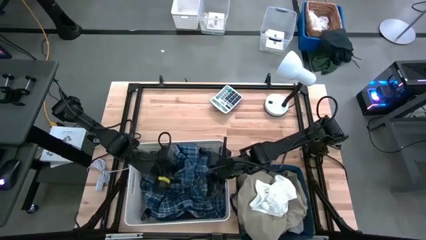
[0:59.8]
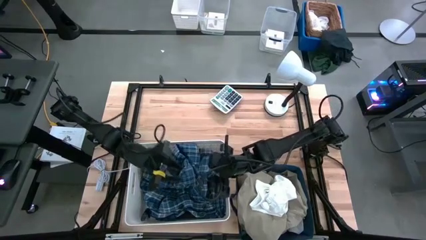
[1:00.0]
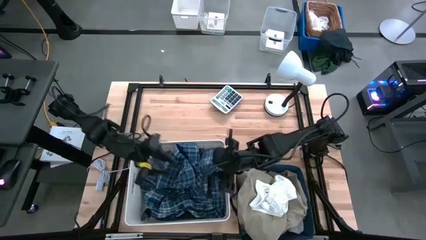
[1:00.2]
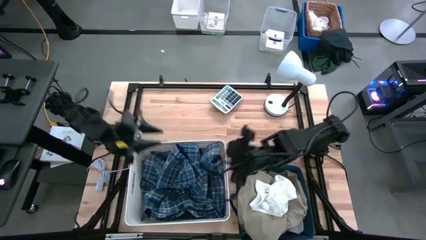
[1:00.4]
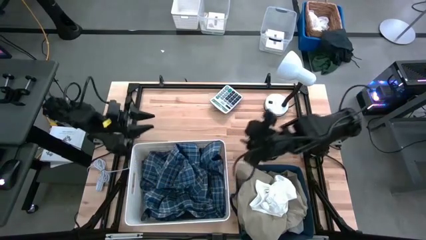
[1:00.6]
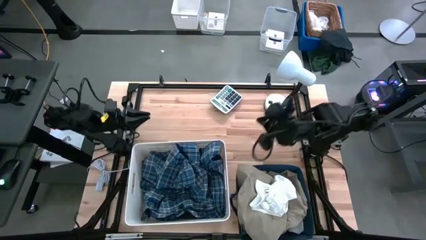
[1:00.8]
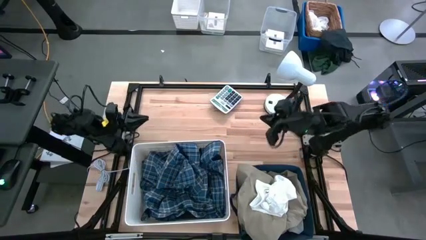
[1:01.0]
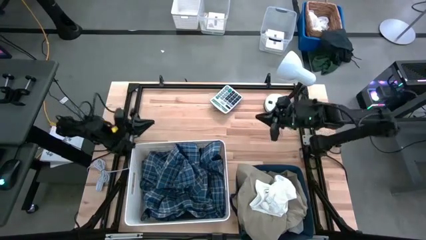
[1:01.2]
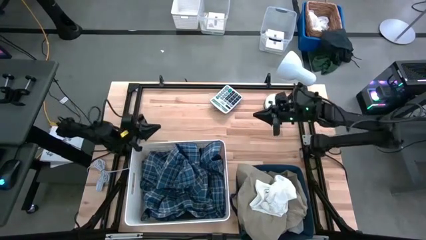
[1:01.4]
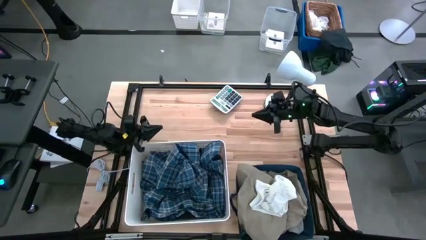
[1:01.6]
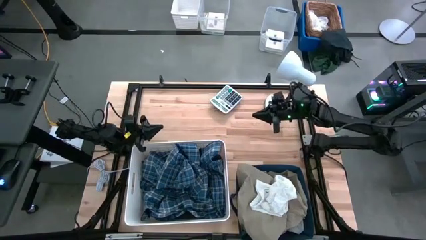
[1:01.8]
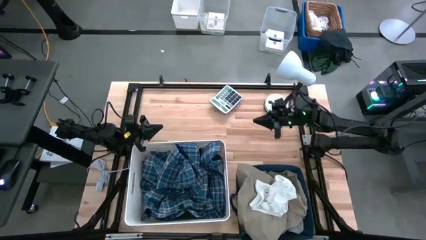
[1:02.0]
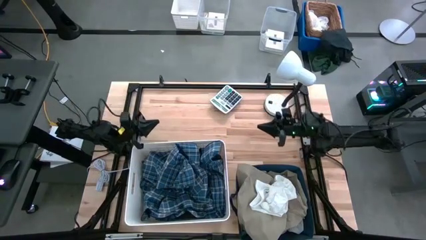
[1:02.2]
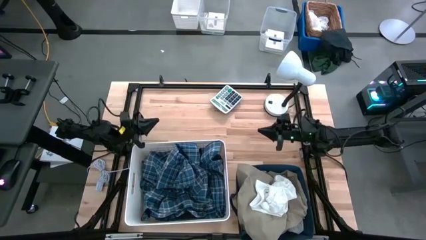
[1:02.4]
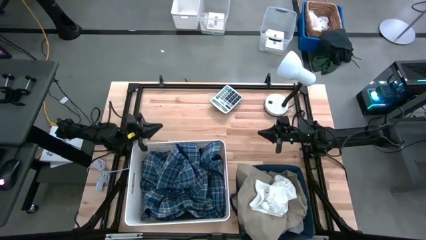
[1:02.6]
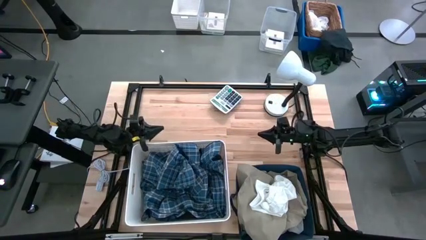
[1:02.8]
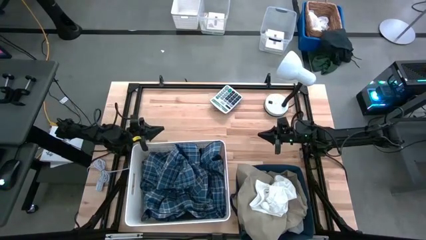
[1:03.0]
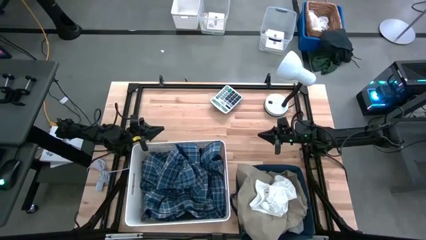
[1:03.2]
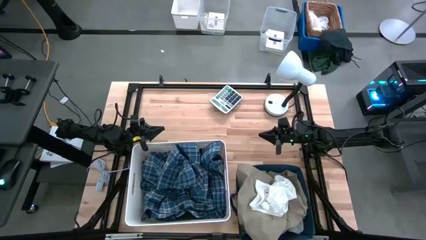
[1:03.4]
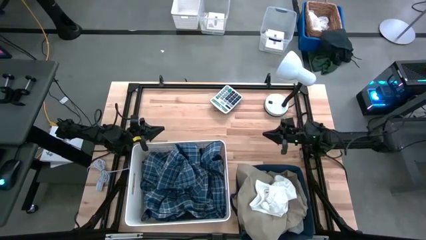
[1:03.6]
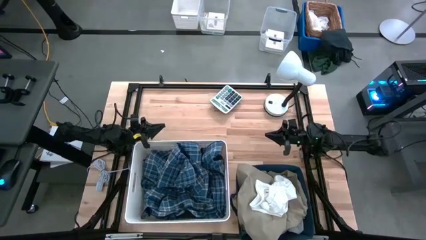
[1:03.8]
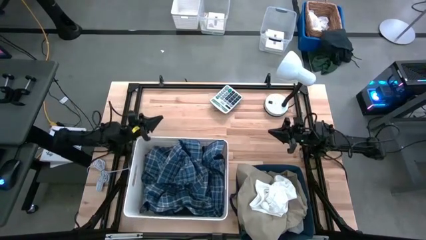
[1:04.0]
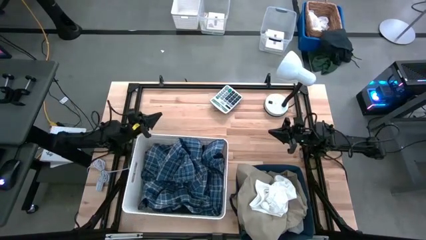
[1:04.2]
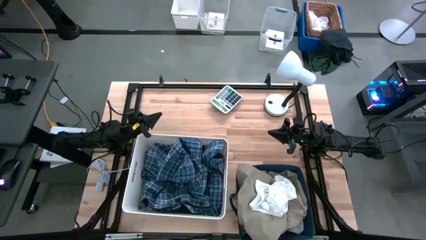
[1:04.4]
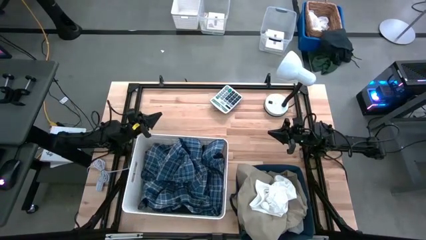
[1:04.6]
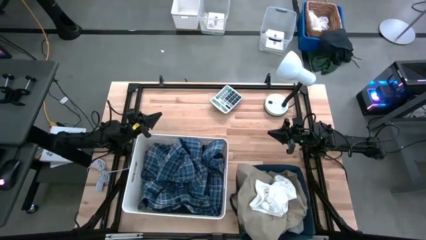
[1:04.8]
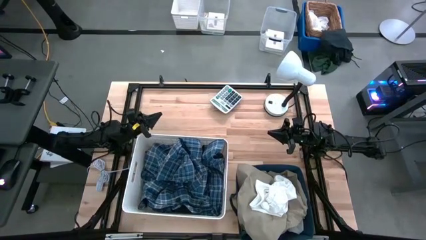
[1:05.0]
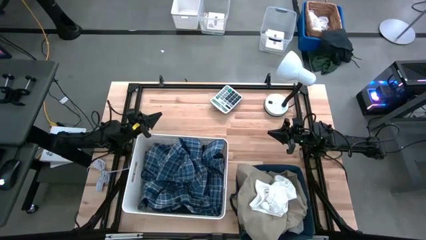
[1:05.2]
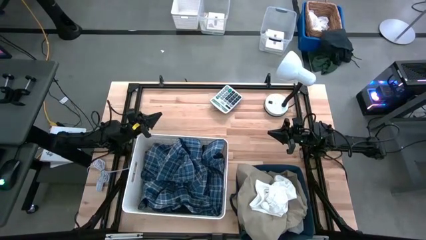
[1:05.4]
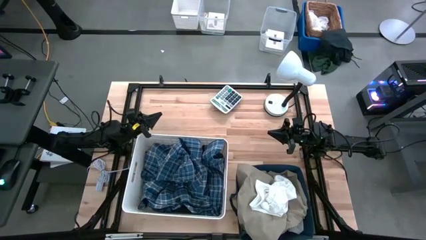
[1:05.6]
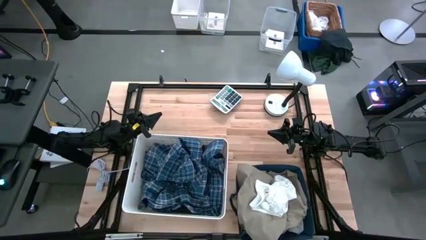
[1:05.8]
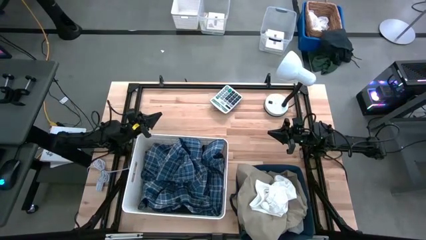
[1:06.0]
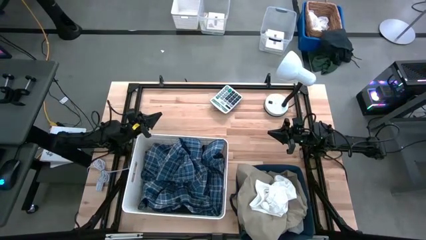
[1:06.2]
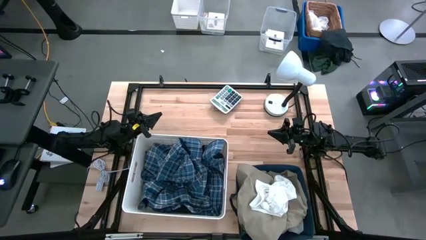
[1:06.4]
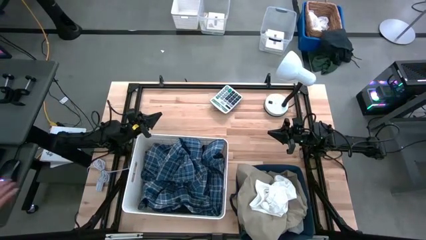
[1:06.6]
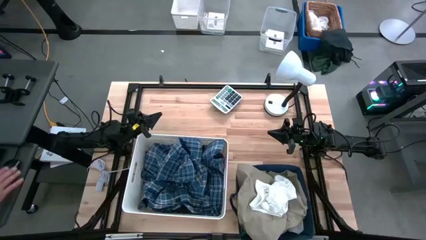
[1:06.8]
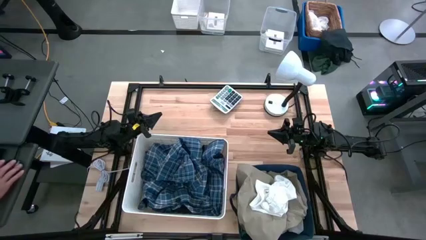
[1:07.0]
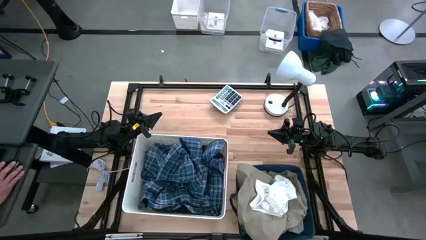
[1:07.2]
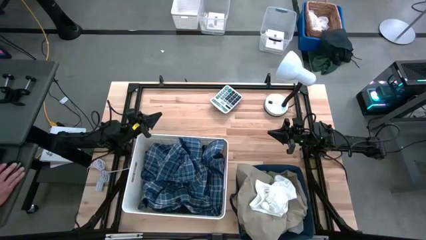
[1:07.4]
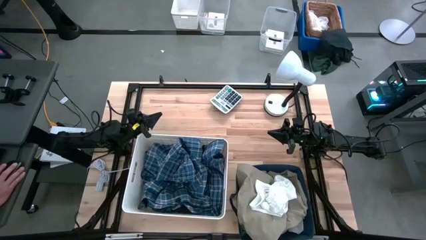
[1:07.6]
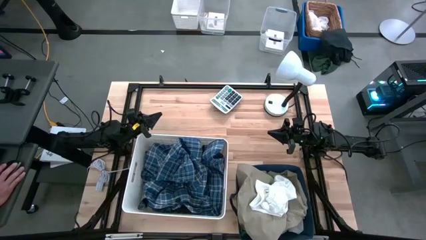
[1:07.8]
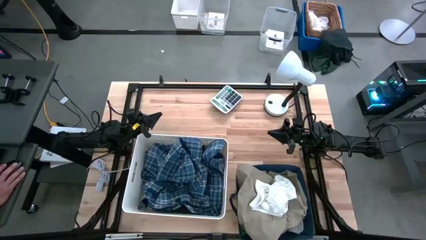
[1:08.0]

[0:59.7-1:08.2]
Task: Sort clothes
Return to Home Position

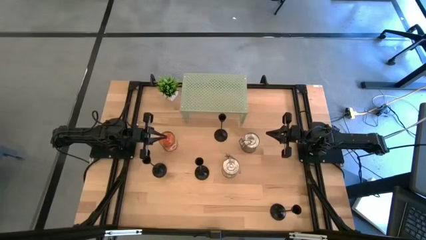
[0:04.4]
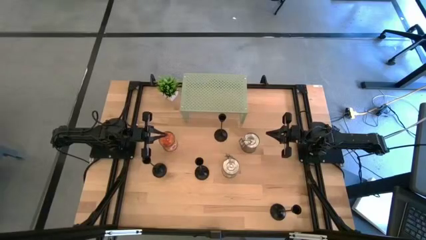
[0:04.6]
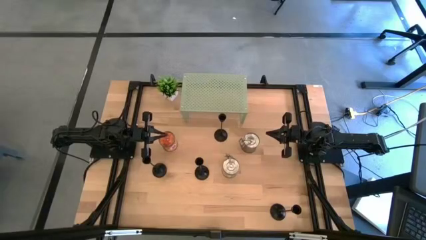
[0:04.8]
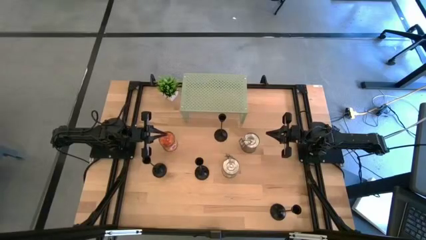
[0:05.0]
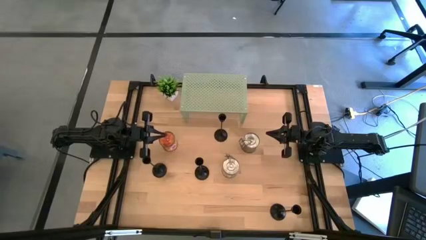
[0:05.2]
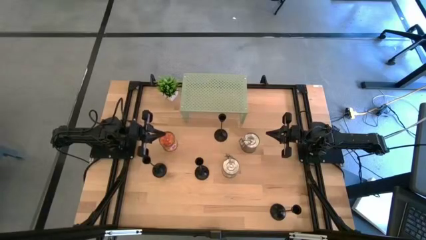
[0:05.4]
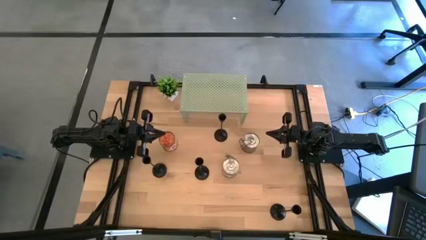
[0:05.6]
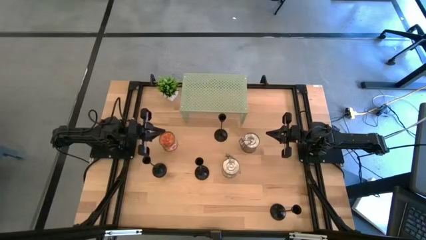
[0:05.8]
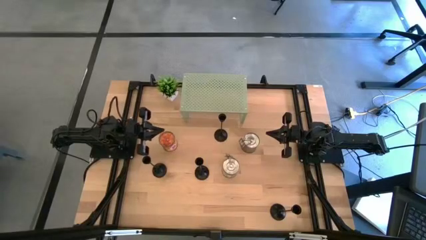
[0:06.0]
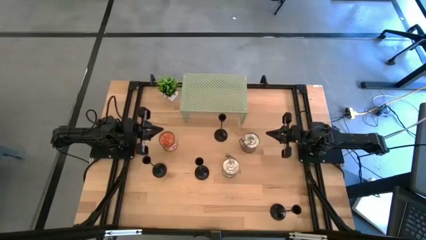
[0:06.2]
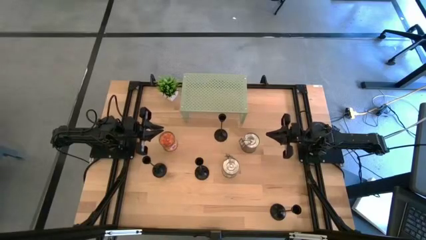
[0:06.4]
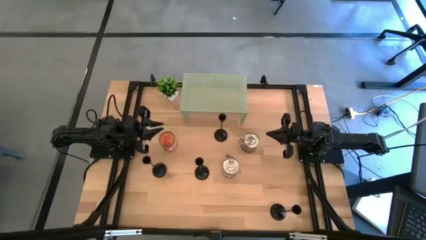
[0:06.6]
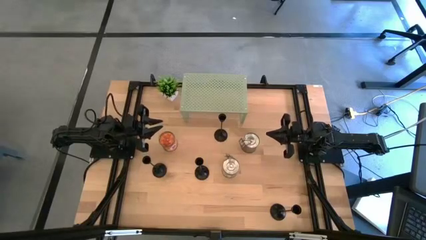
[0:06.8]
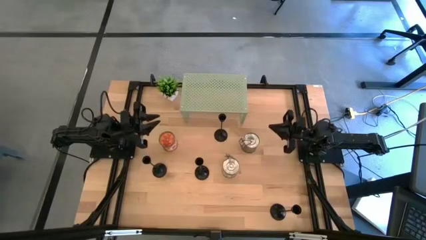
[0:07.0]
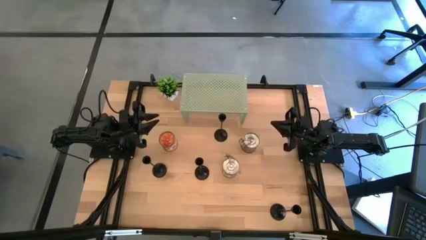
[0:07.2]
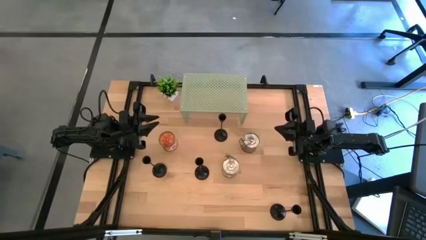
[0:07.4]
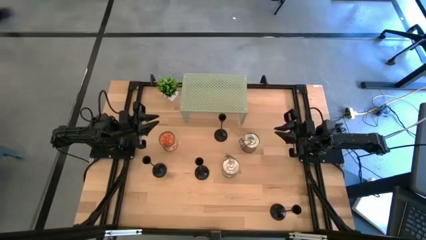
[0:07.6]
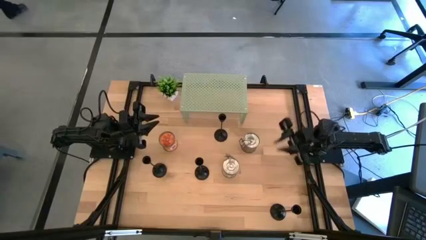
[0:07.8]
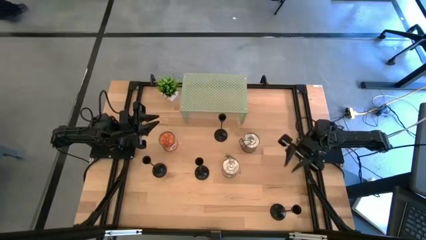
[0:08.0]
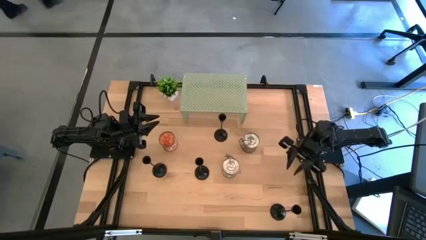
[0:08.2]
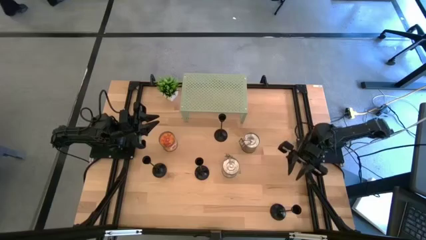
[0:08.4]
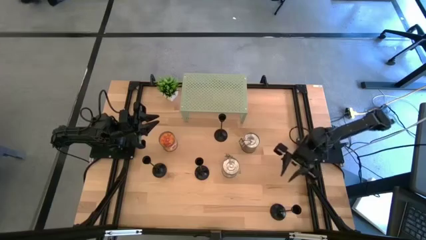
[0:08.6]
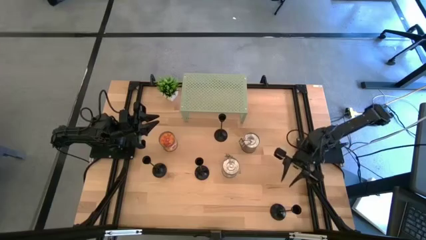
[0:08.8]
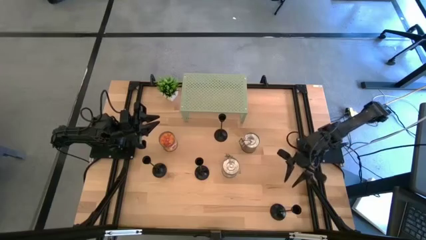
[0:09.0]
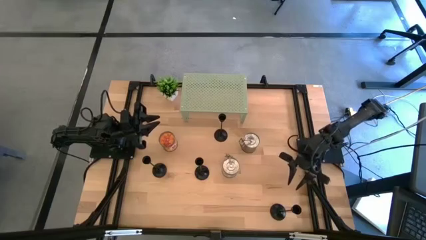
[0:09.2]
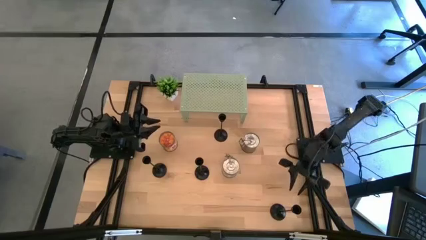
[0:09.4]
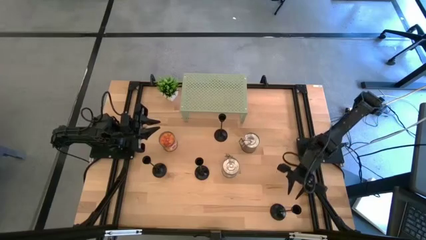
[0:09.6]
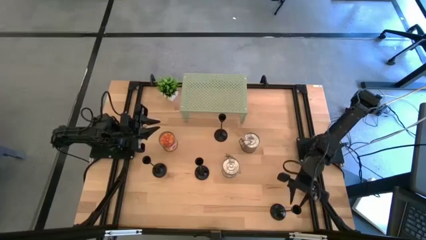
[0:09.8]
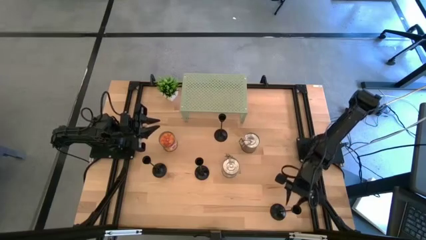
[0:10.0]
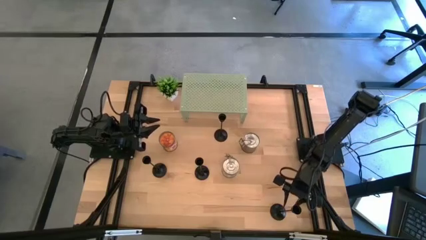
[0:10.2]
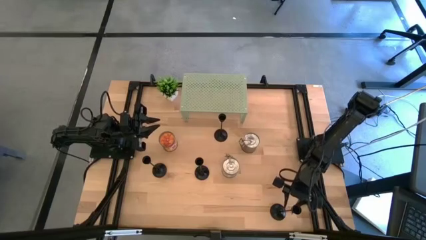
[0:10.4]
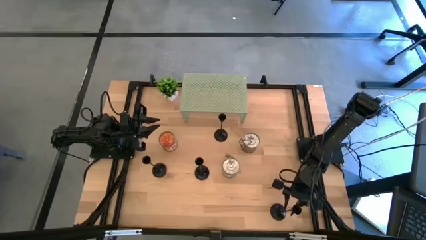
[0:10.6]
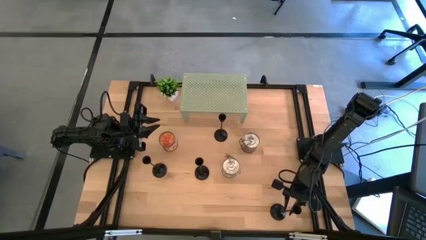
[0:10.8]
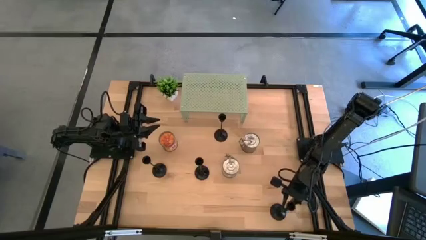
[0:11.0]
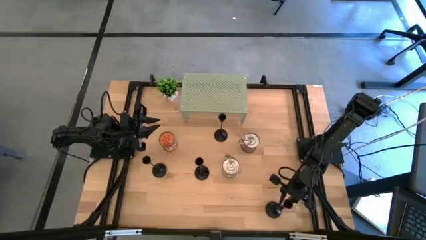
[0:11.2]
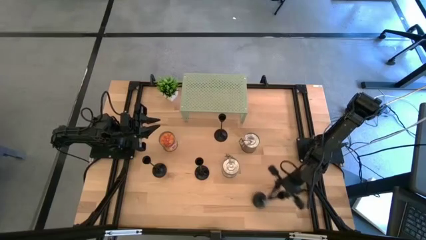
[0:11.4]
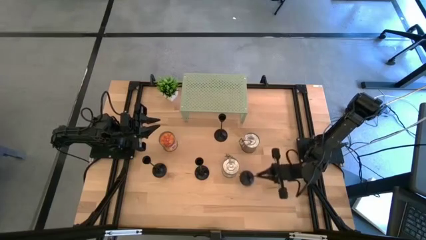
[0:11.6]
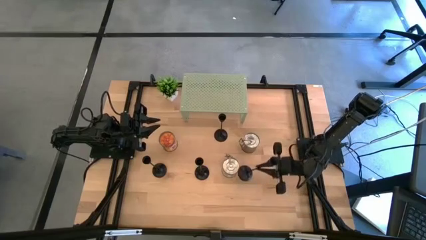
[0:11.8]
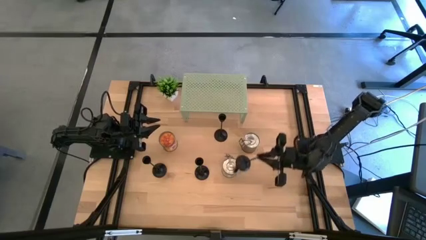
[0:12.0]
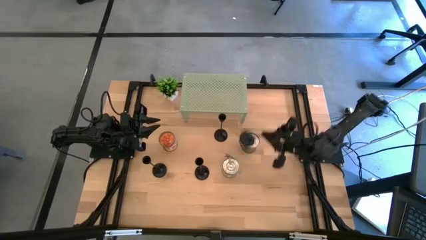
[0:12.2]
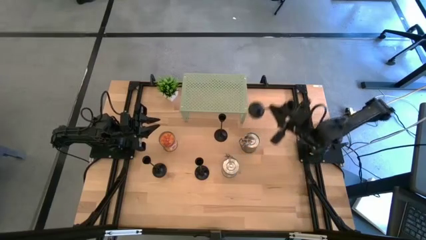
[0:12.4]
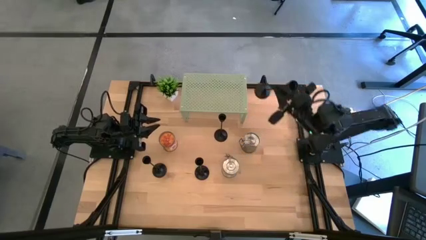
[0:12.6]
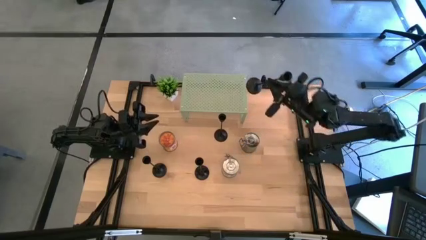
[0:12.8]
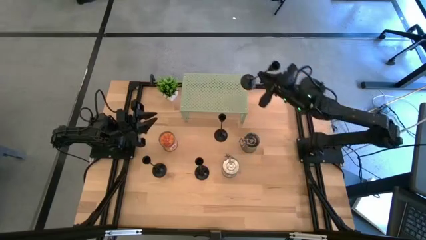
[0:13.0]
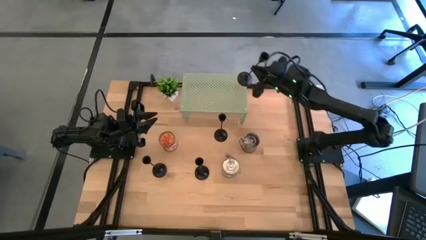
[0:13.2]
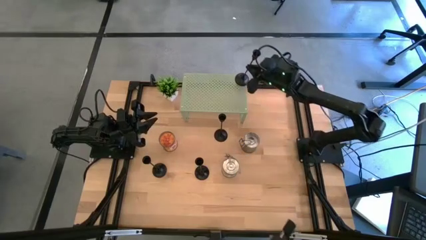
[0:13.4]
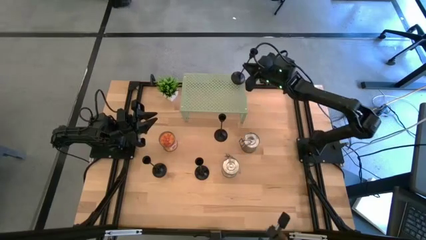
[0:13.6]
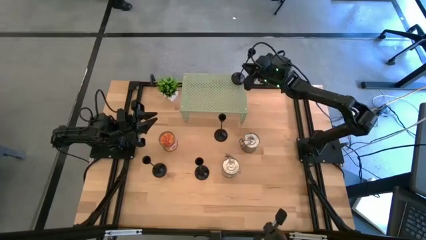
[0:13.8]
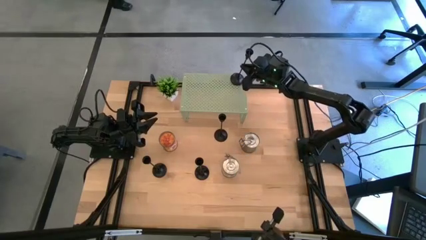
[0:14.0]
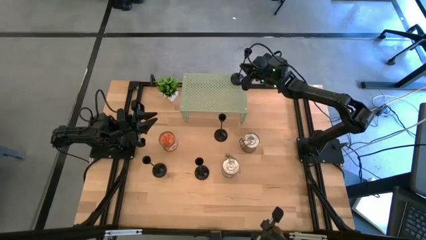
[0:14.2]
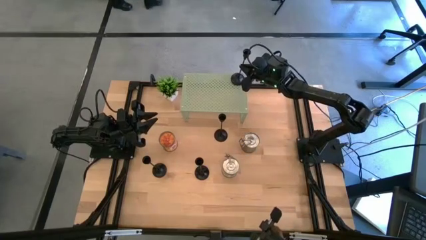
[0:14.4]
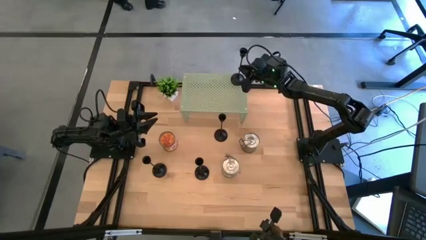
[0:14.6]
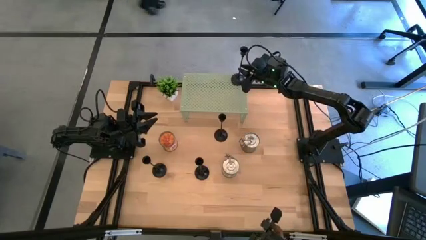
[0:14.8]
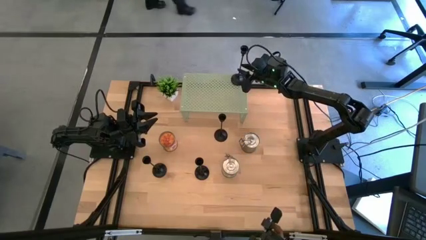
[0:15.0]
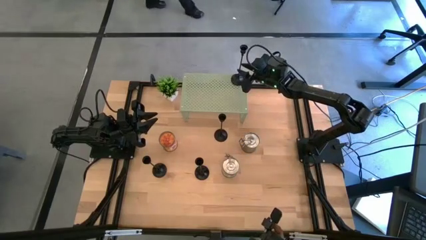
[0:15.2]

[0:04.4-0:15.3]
Task: Pick & Place candle stick holders
Put the black candle holder on the shelf
